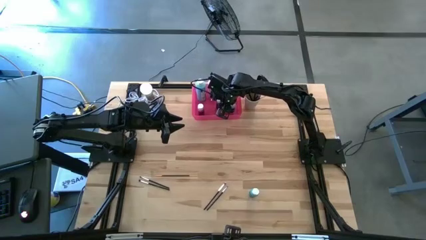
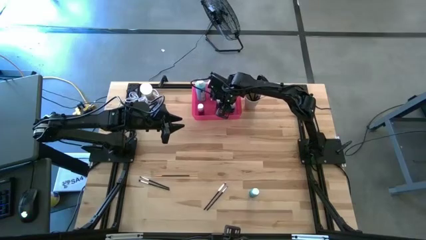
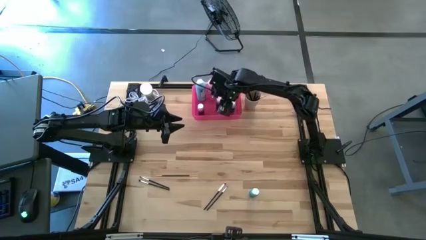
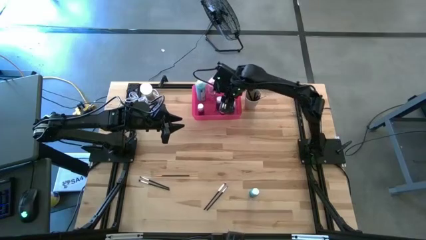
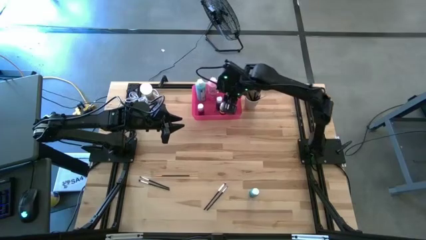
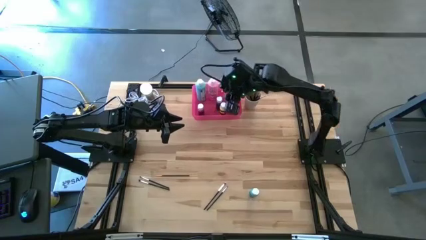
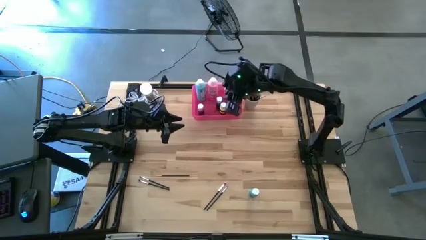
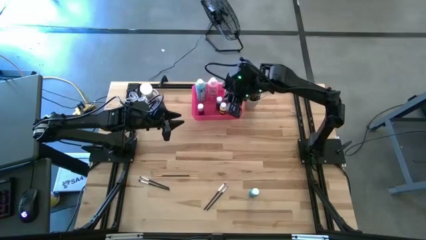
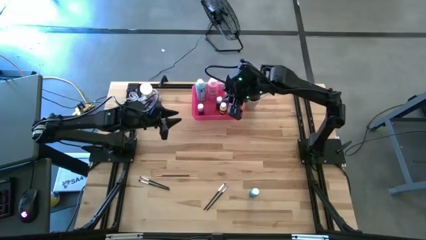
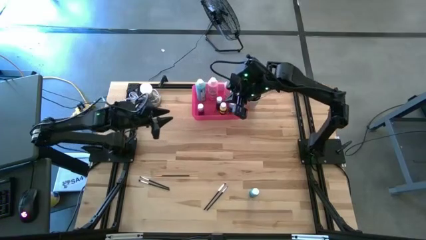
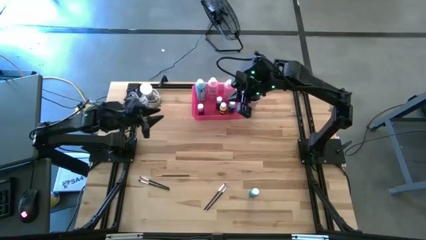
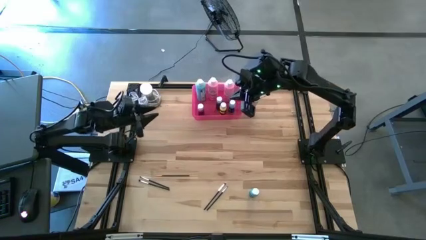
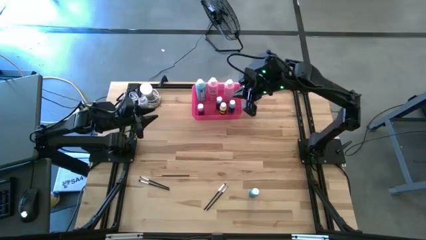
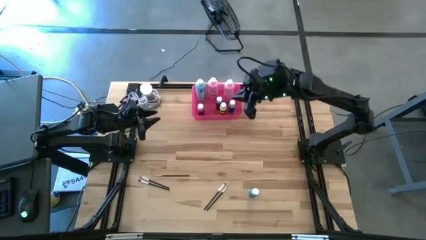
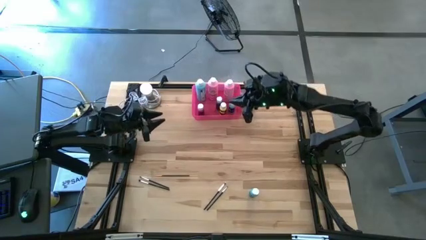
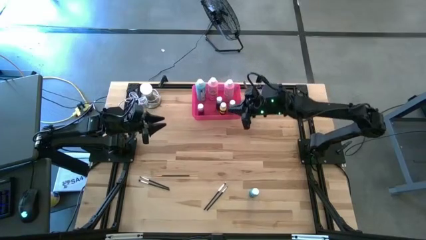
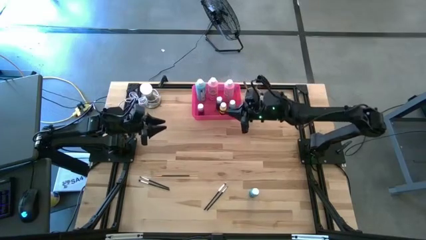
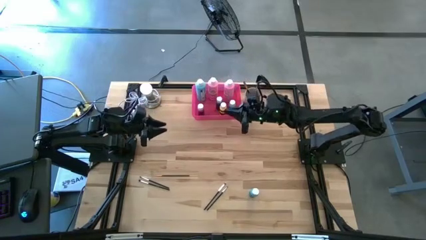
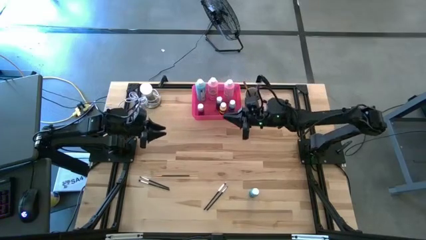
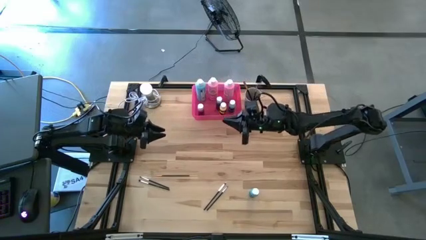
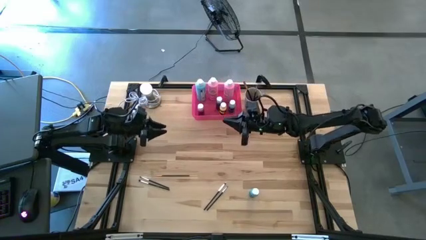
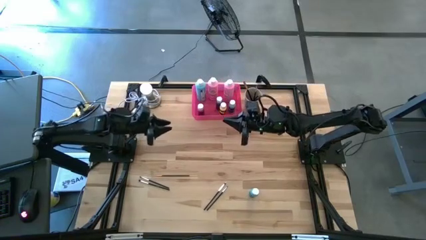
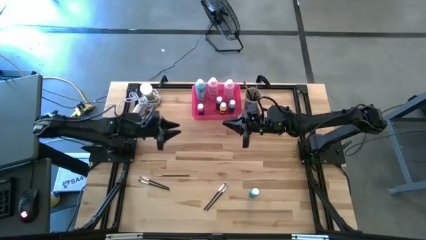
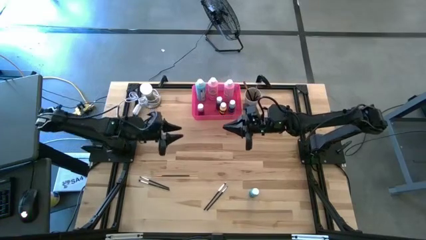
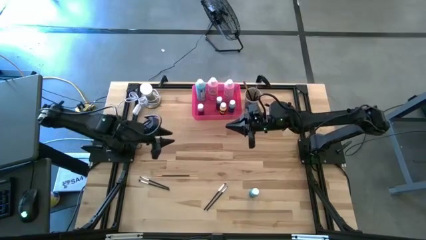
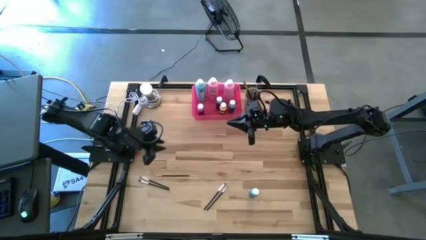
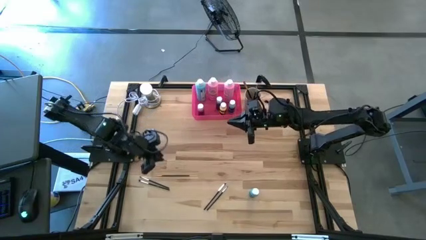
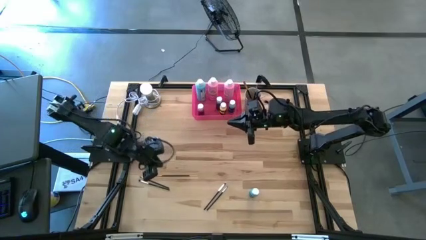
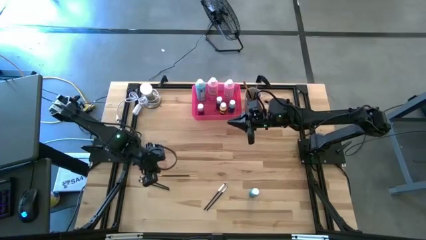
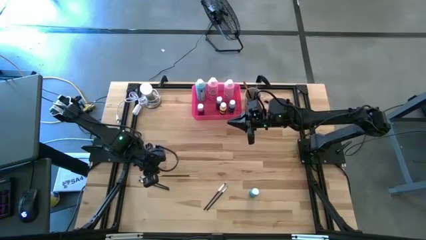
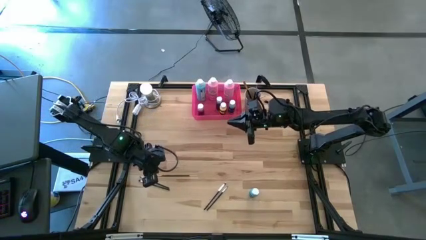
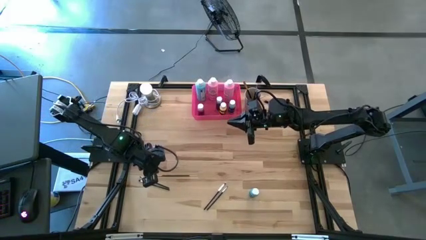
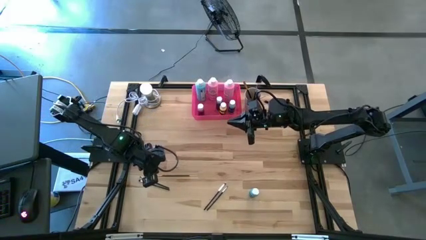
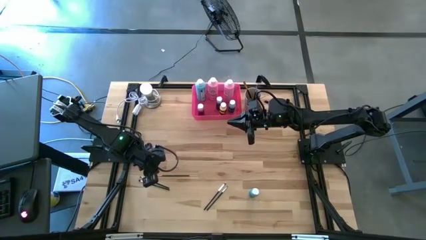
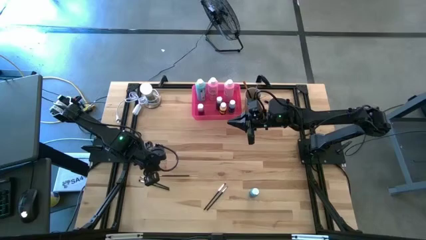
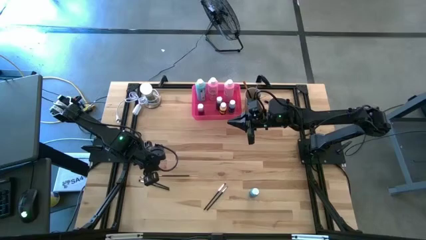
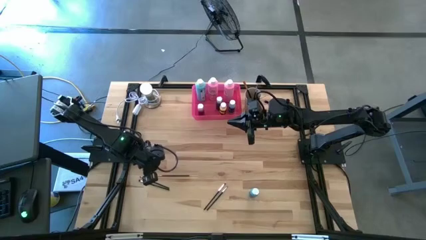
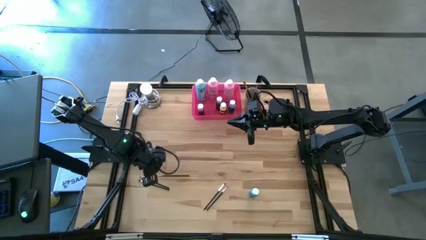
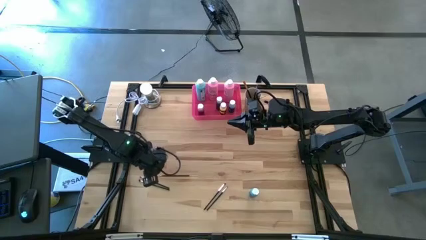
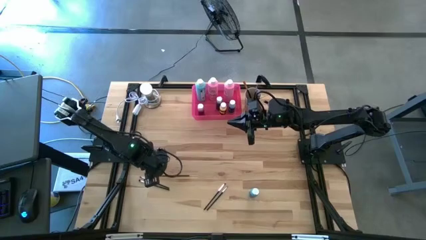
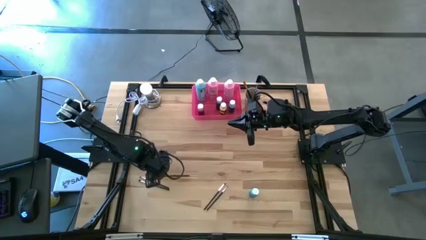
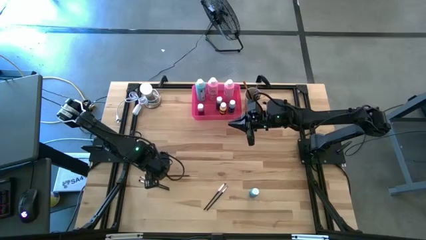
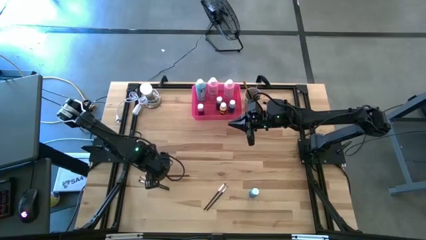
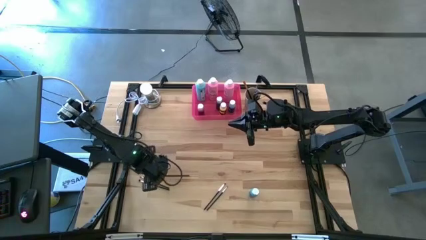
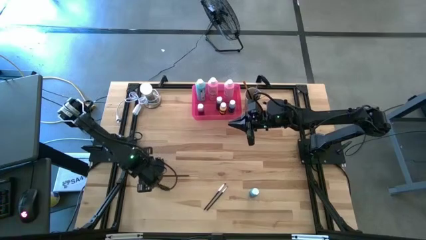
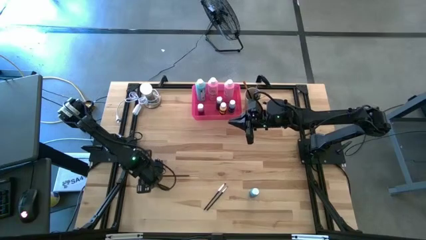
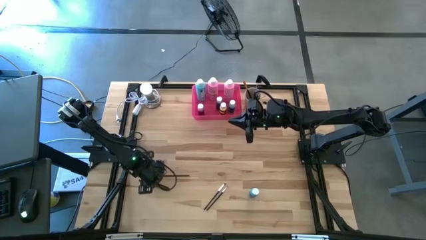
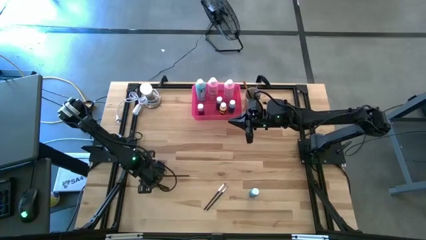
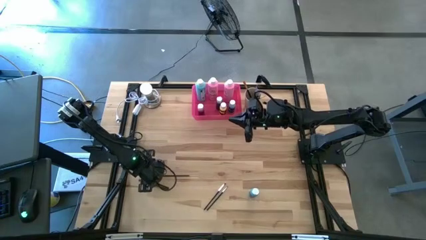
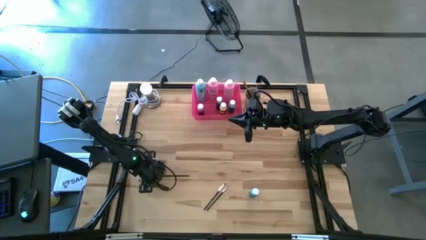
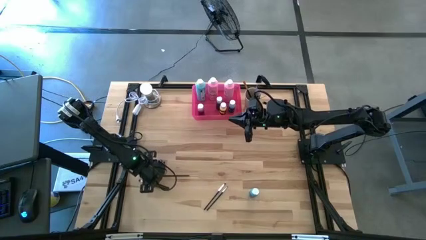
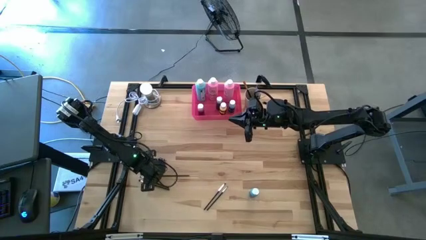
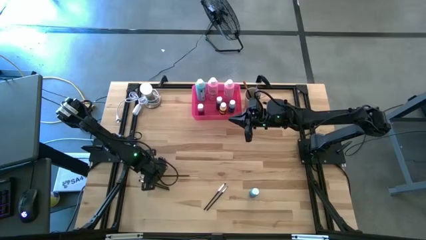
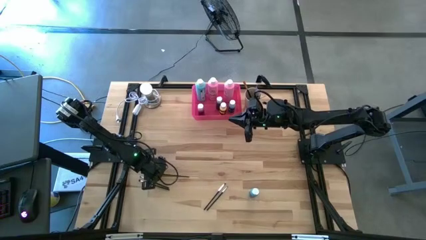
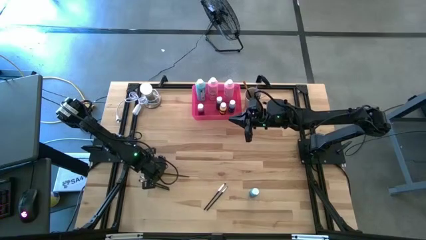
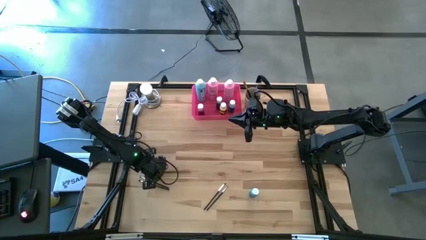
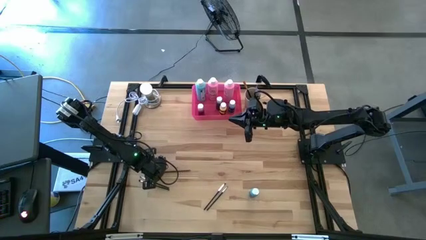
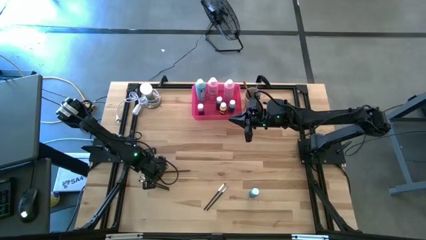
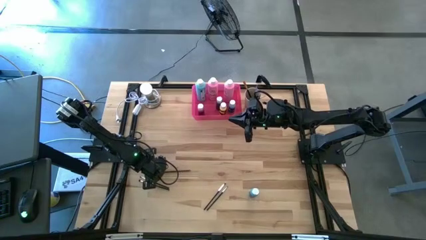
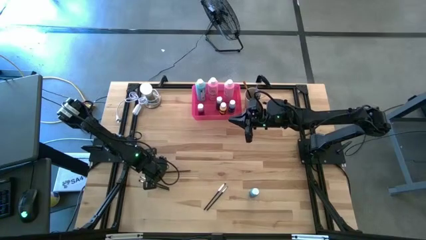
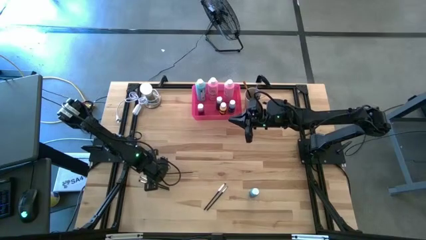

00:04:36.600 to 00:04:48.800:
Task: Pick & Place Paint Supplies
Put the orange paintbrush into the white cup
